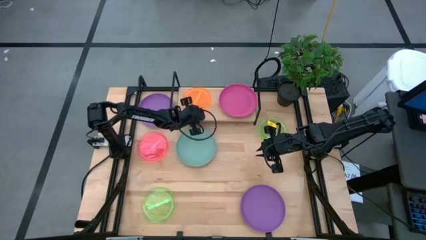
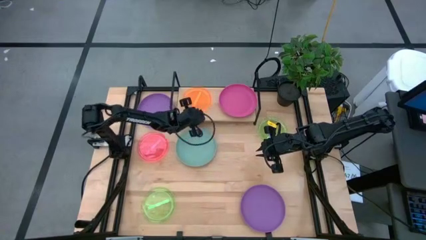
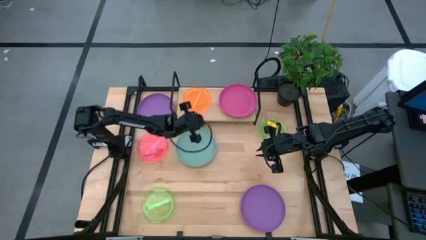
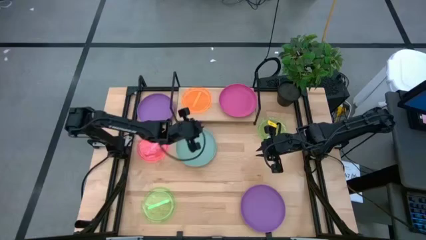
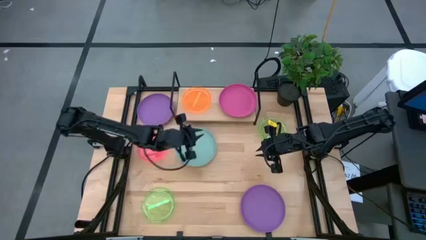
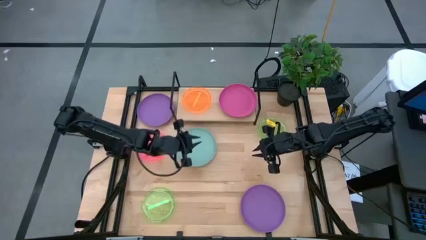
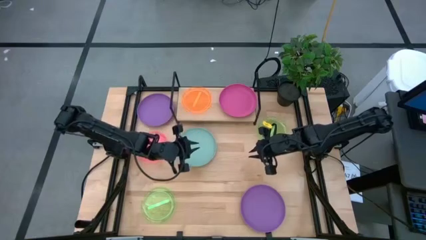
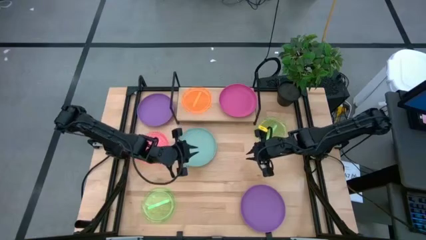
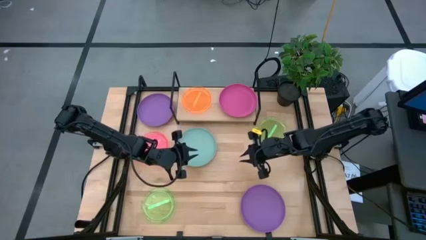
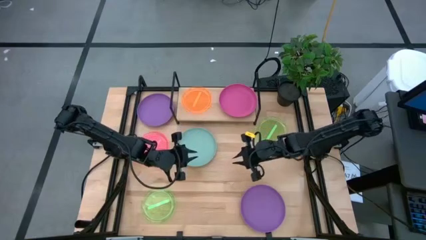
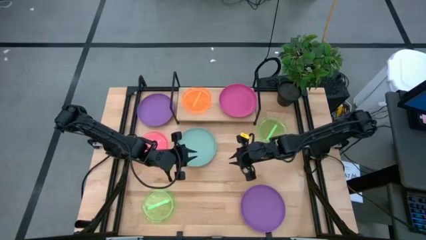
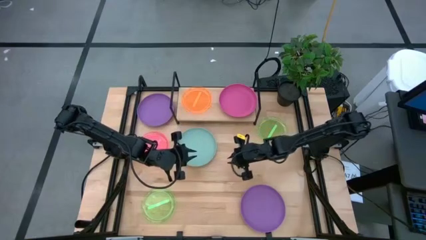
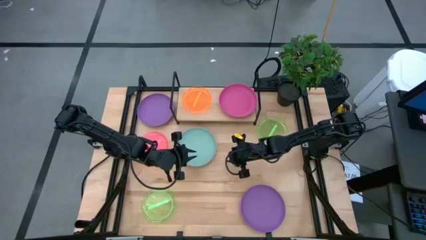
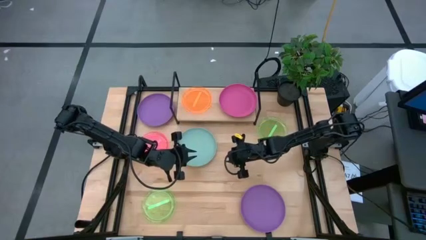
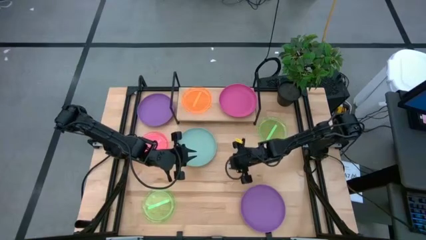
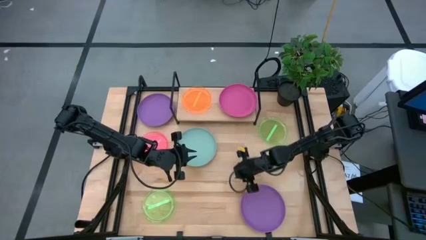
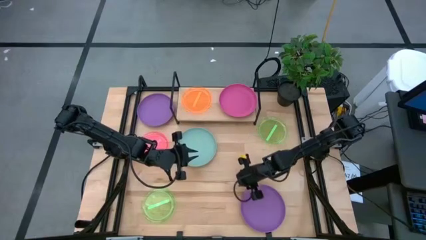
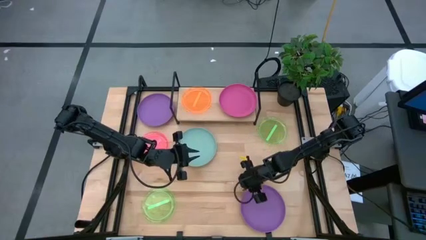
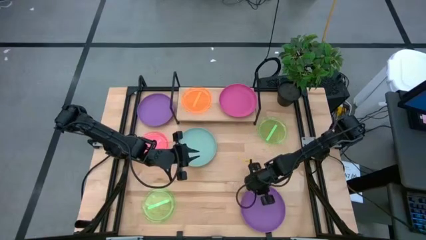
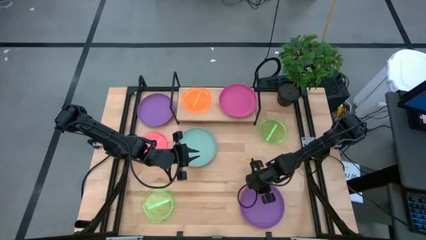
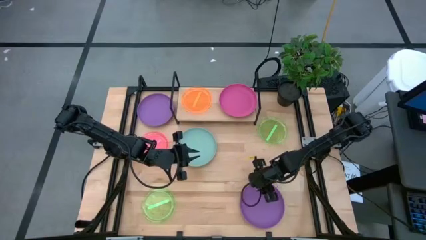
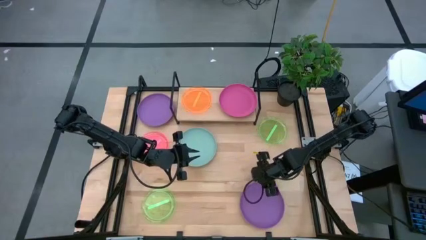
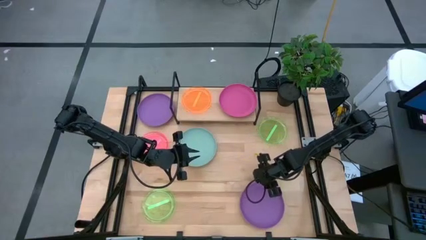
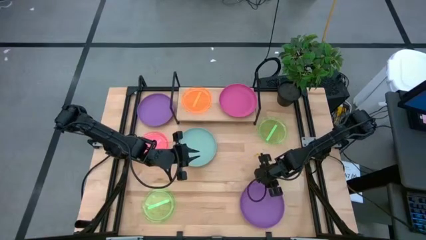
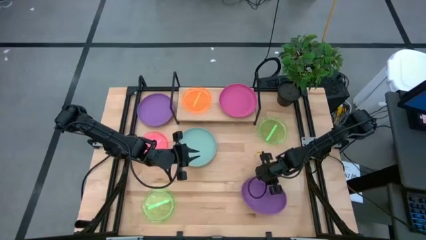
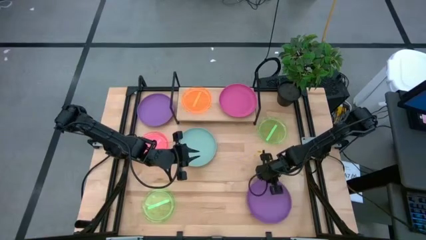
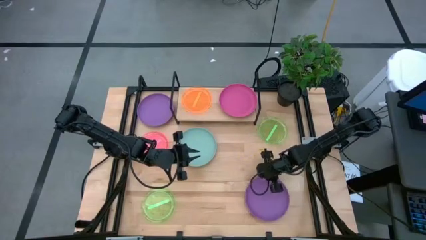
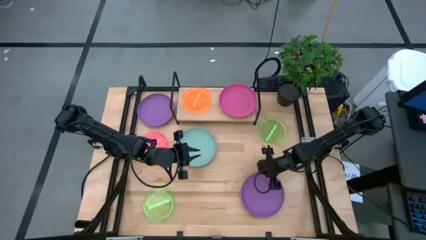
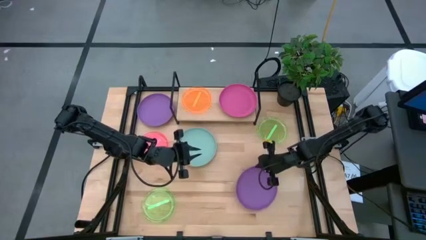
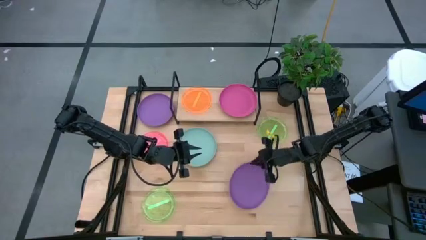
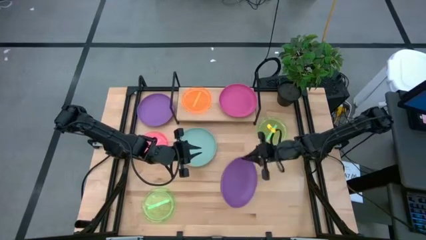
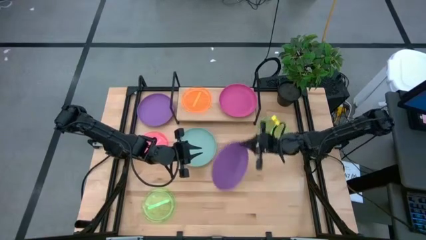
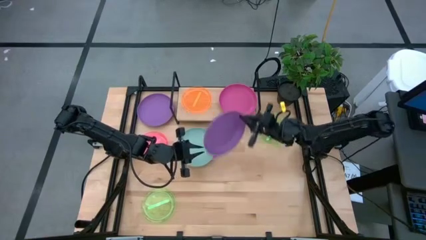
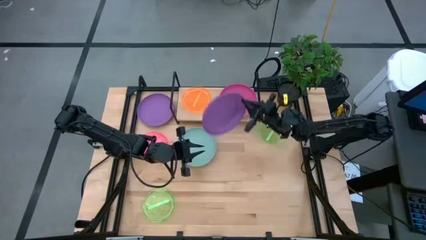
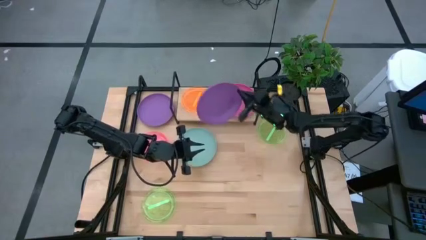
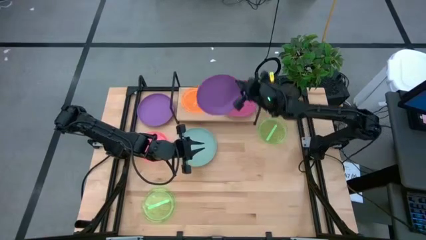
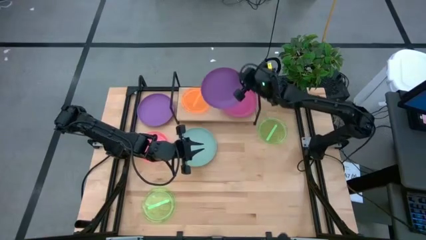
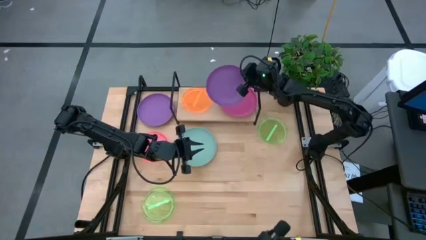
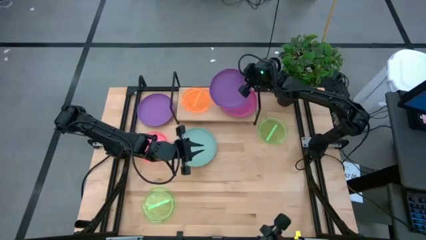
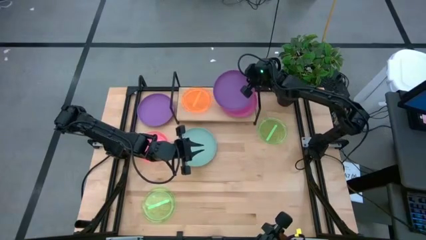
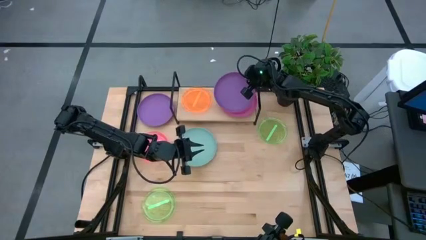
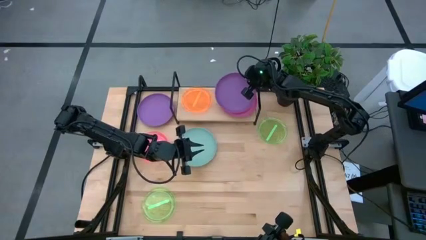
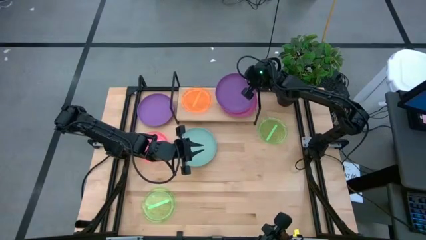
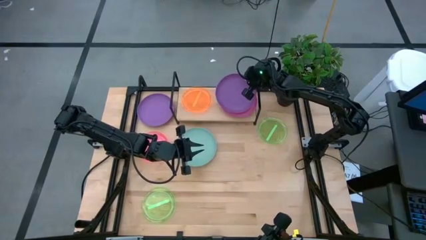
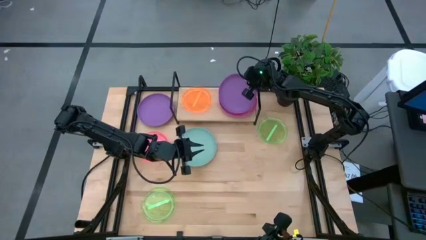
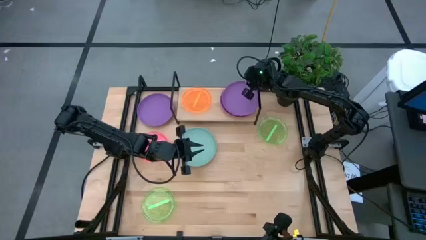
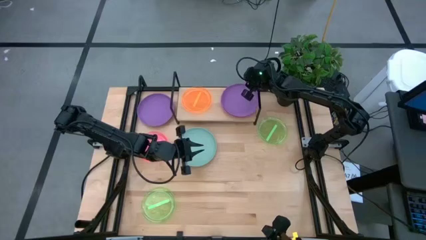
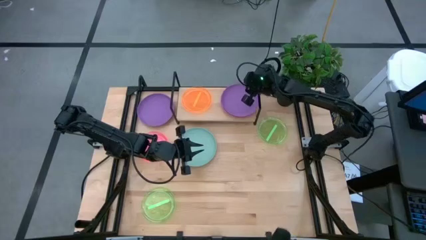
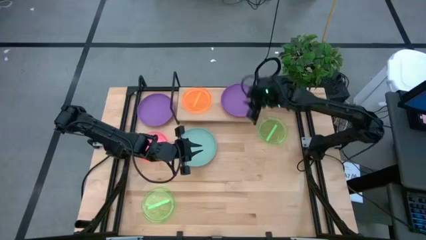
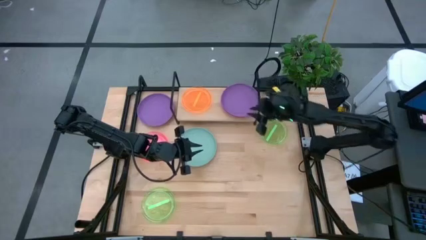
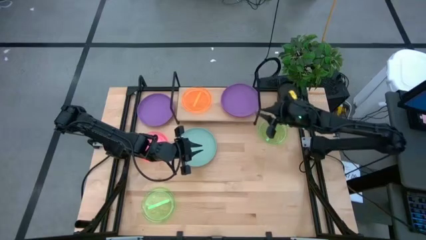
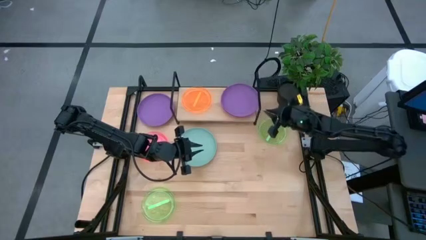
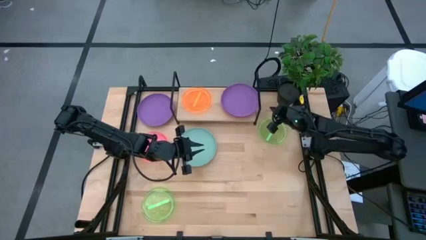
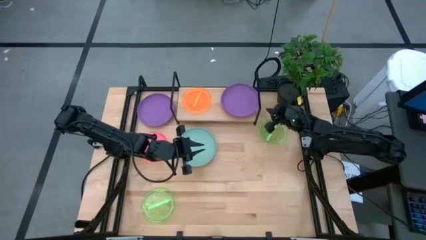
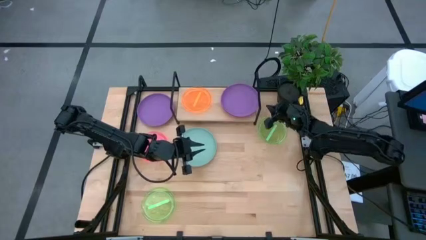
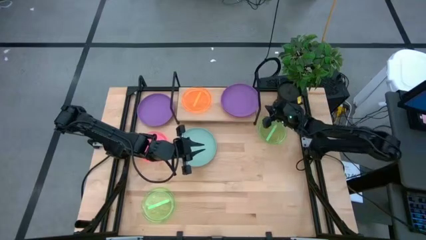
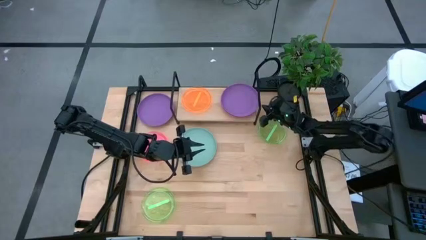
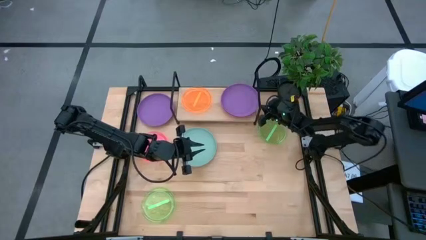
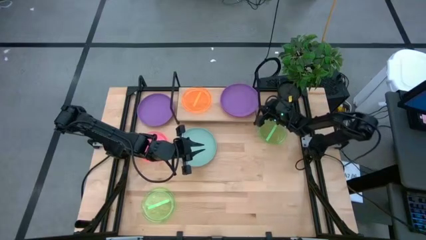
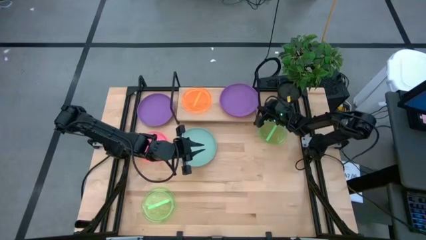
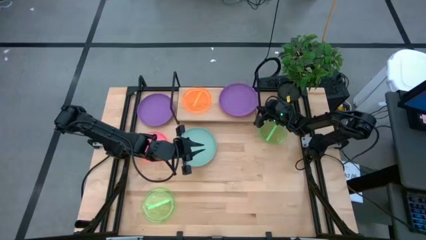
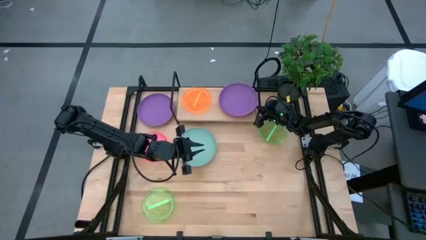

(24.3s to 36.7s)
Task: Place and stack plates onto a shelf
Stack the bottom large violet plate on top of the pink plate on the shelf

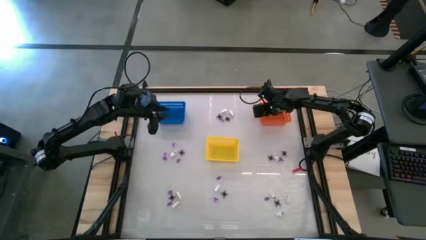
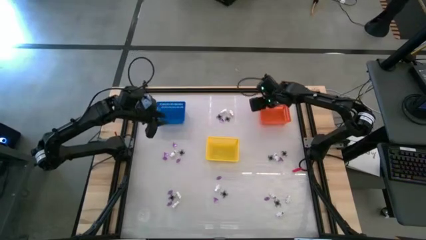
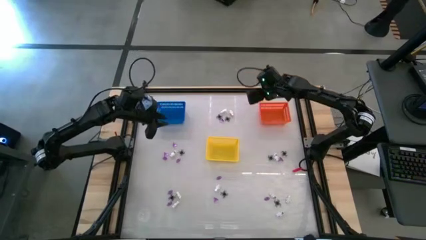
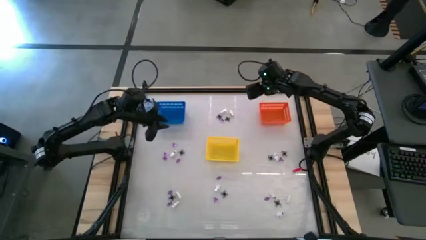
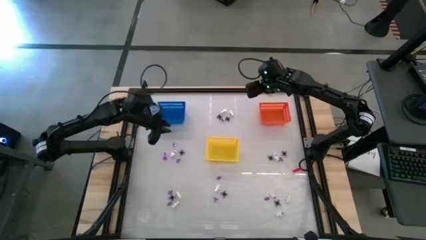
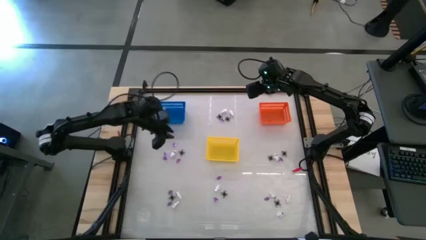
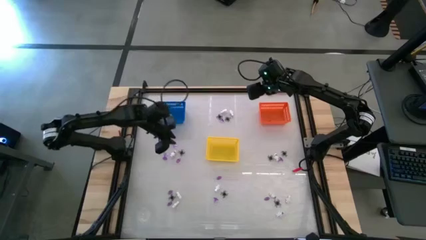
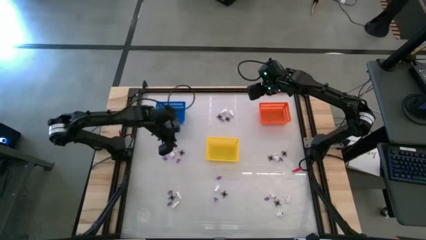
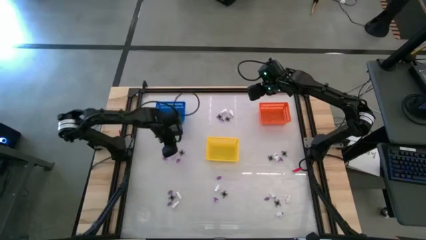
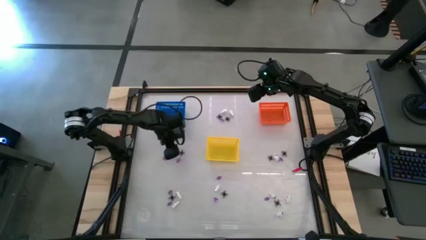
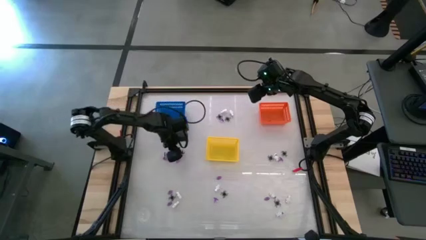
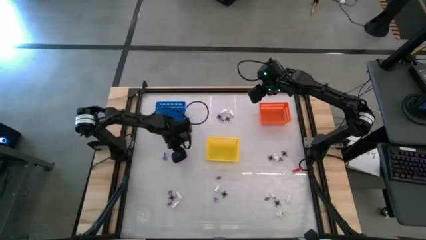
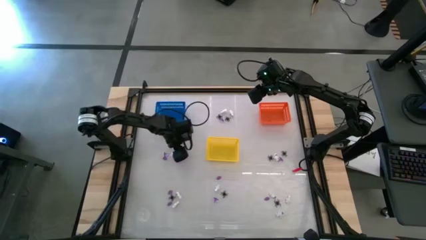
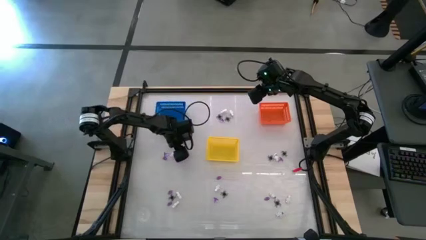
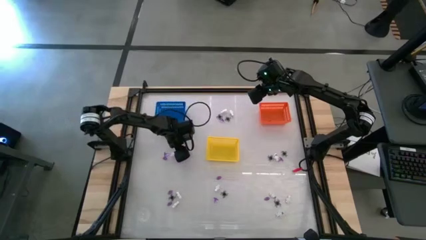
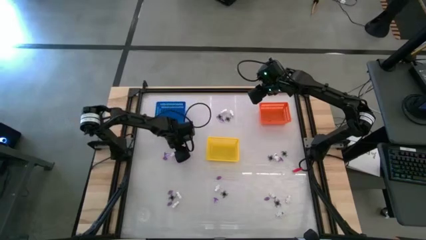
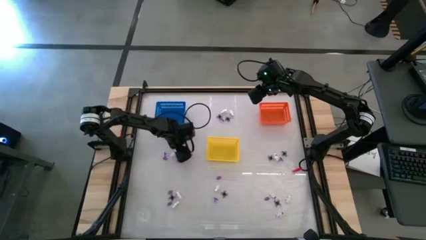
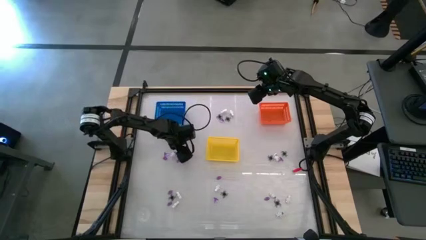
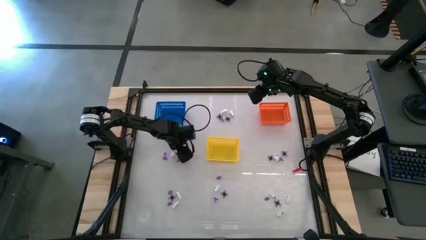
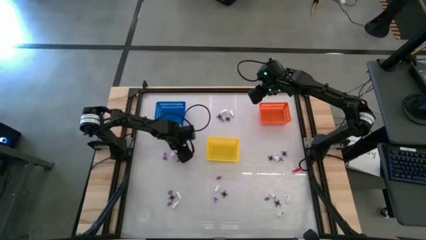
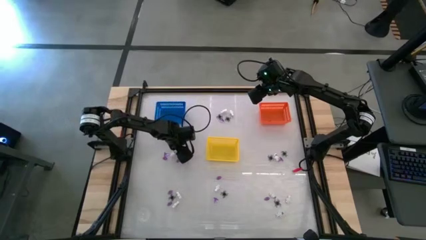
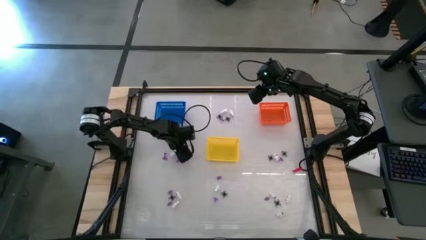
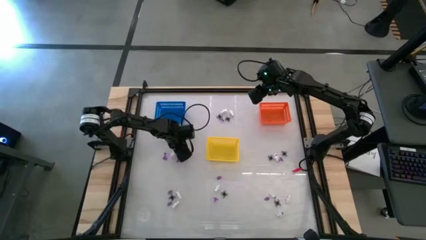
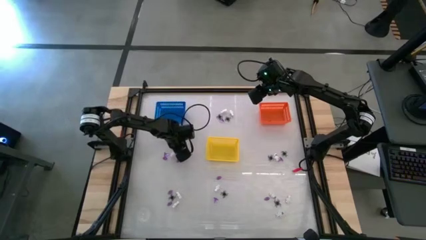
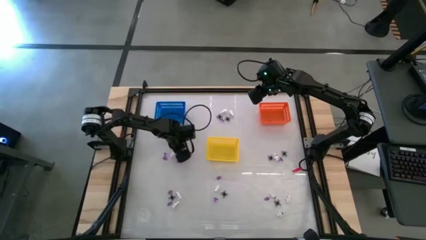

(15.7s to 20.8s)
Task: Sort Halloween decoration
Put the black spider toy into the blue bin
